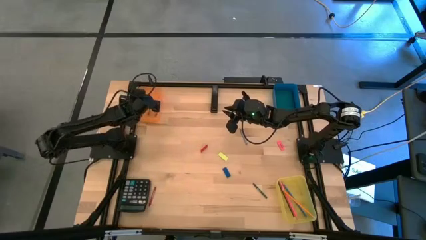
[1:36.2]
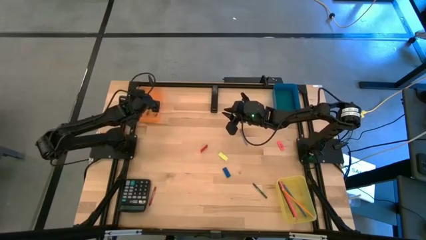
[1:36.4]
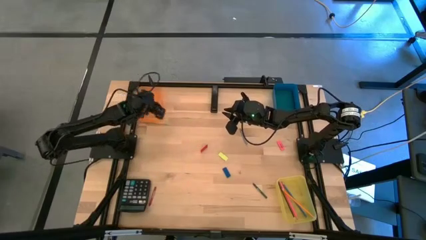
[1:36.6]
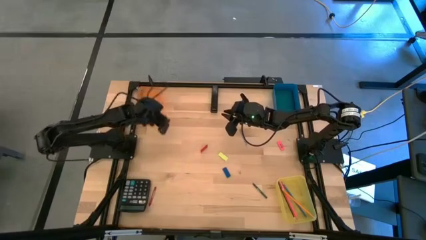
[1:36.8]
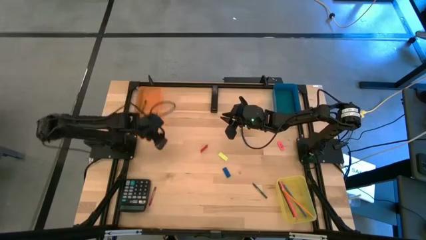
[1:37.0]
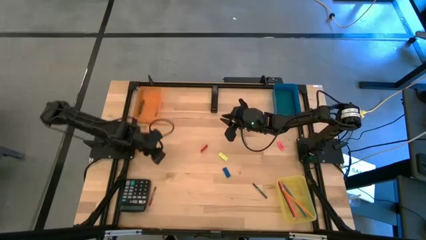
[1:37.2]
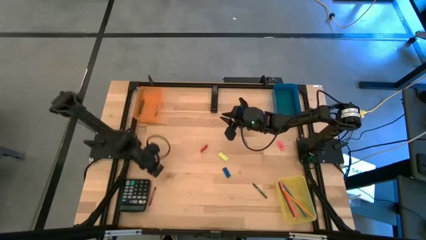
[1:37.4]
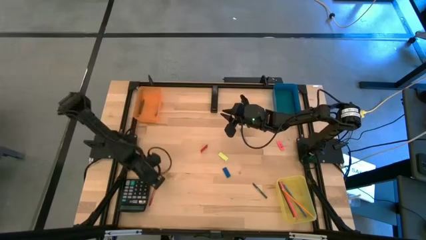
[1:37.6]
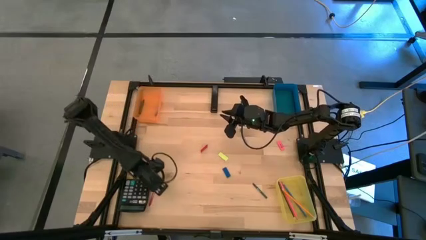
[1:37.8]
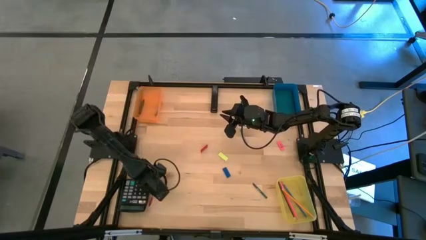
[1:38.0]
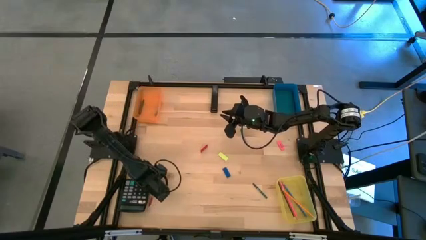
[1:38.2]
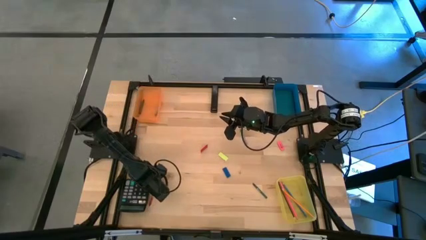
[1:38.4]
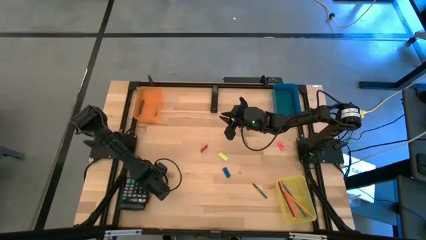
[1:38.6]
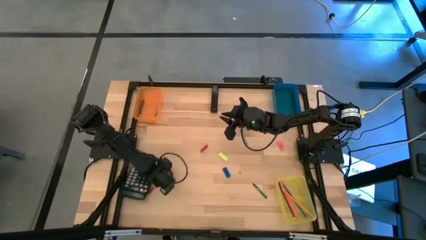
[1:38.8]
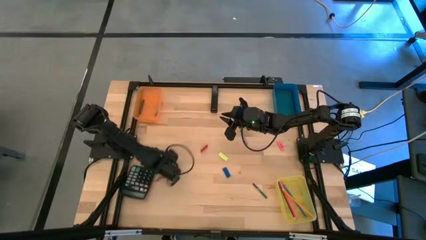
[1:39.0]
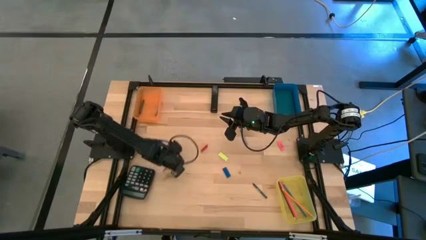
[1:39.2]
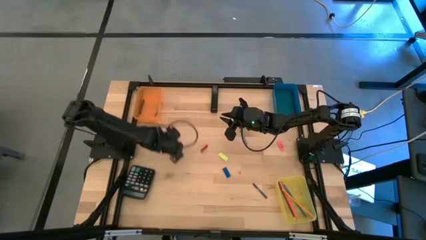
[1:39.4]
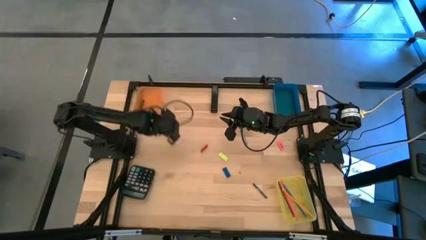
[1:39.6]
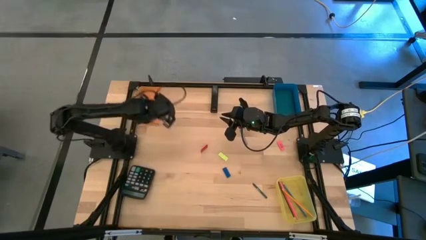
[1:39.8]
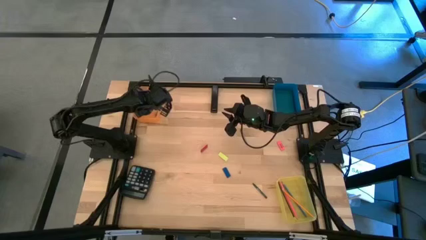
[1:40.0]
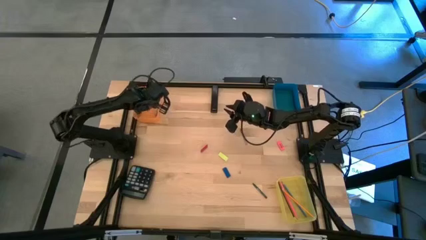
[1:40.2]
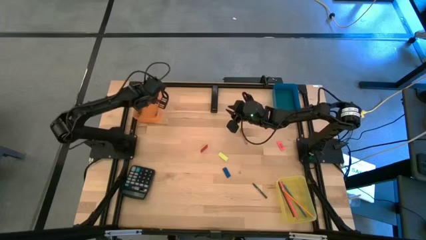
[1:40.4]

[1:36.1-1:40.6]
Task: Sort crayons/erasers/pens/pencils in bins
Put the red crayon into the orange bin

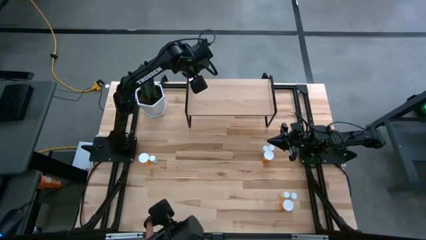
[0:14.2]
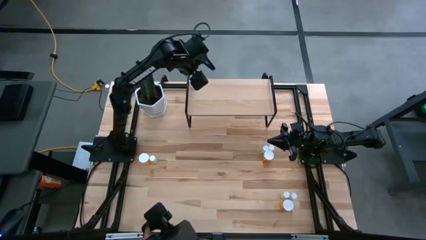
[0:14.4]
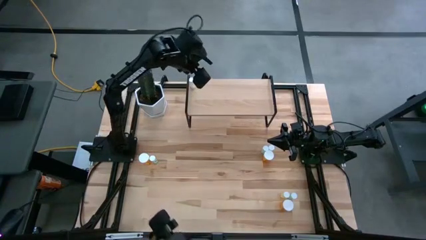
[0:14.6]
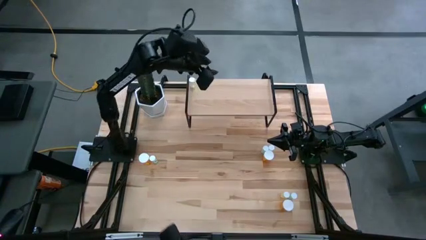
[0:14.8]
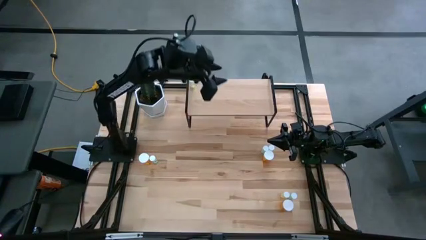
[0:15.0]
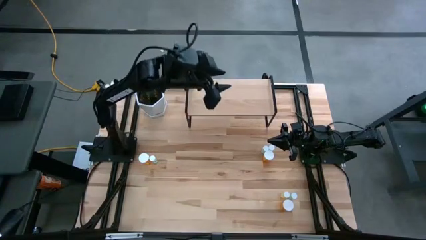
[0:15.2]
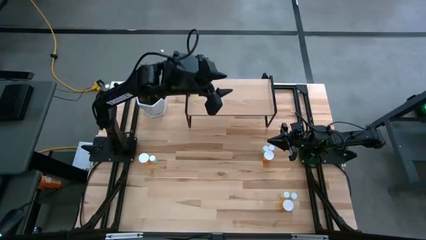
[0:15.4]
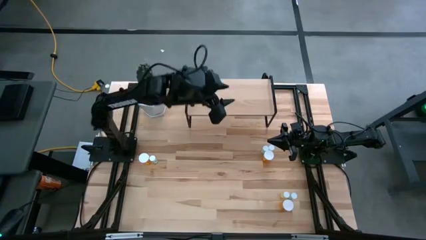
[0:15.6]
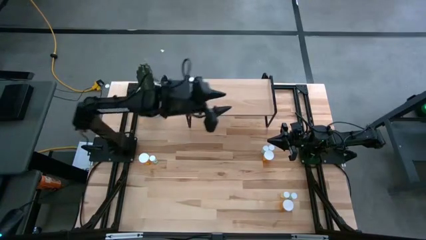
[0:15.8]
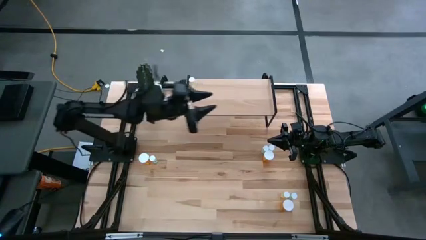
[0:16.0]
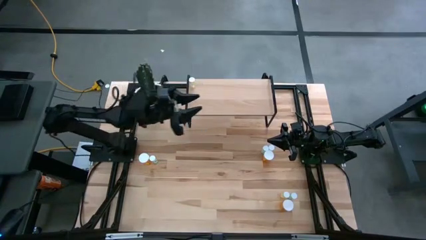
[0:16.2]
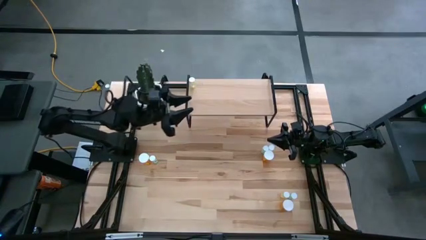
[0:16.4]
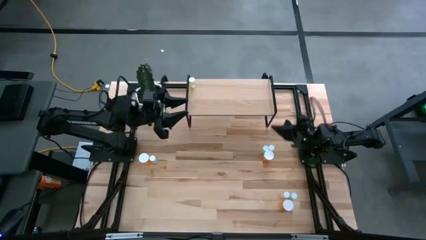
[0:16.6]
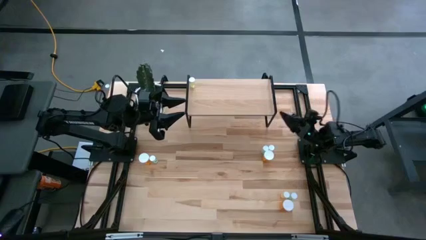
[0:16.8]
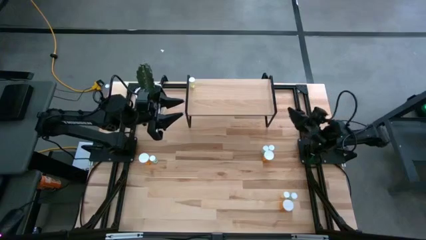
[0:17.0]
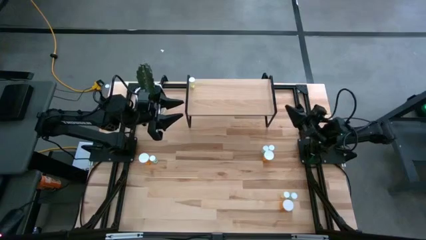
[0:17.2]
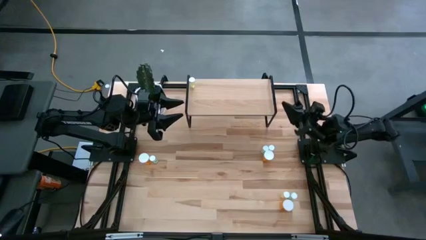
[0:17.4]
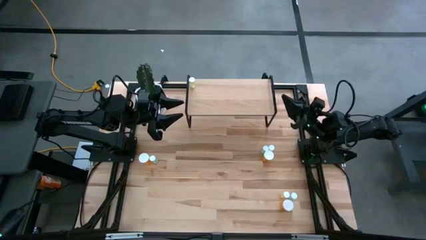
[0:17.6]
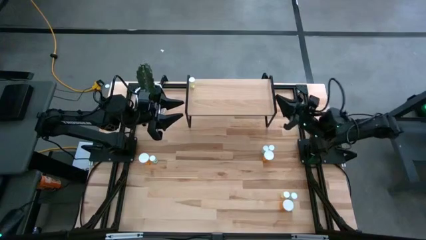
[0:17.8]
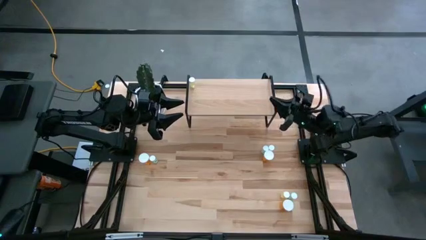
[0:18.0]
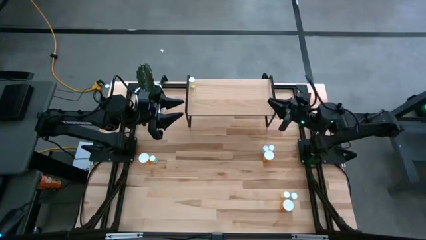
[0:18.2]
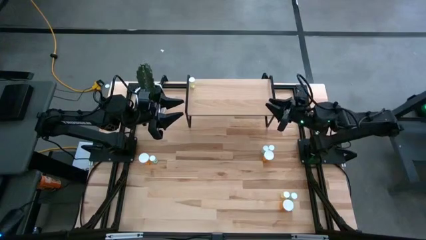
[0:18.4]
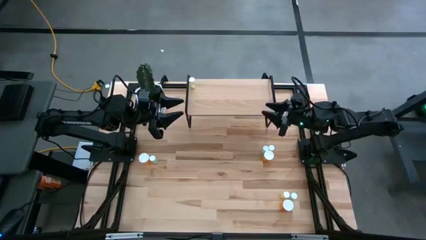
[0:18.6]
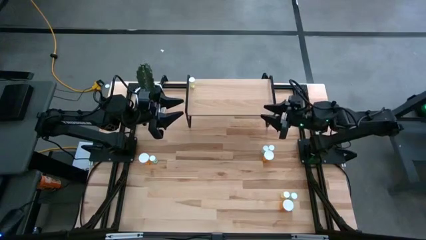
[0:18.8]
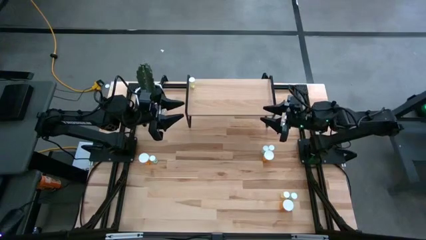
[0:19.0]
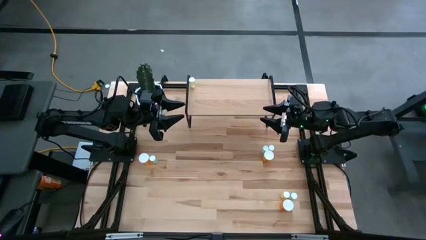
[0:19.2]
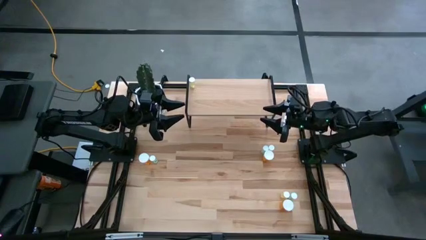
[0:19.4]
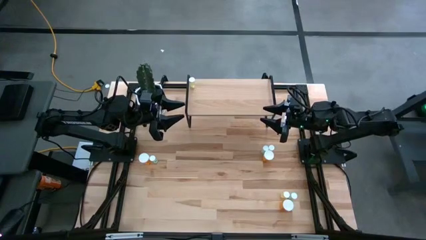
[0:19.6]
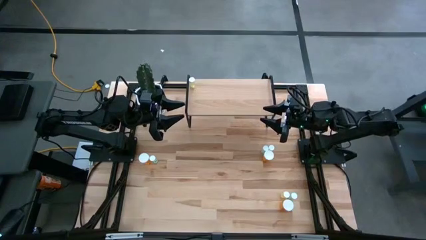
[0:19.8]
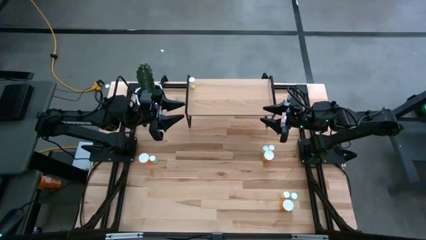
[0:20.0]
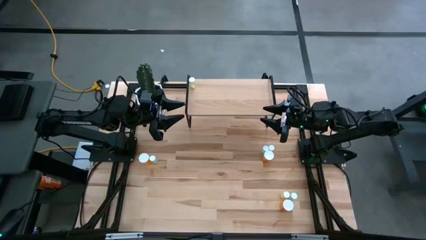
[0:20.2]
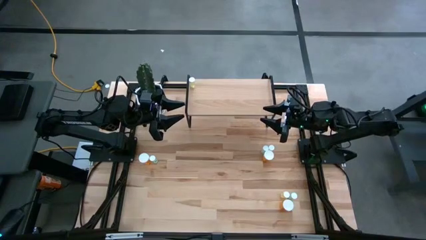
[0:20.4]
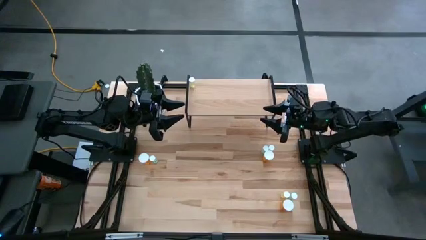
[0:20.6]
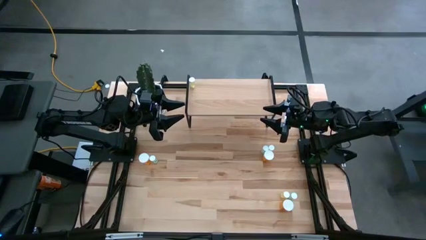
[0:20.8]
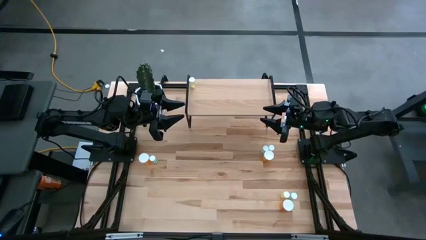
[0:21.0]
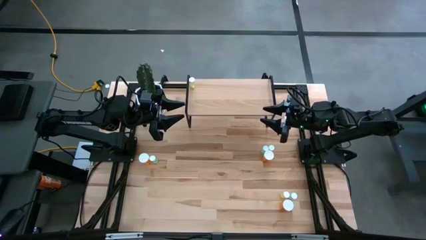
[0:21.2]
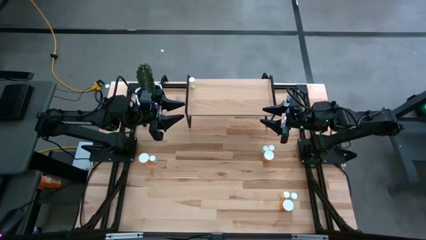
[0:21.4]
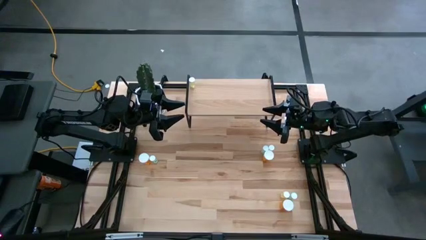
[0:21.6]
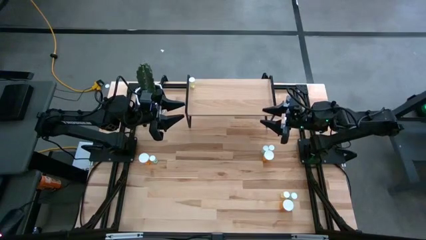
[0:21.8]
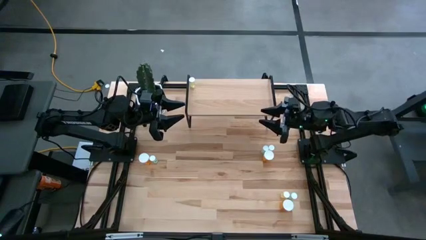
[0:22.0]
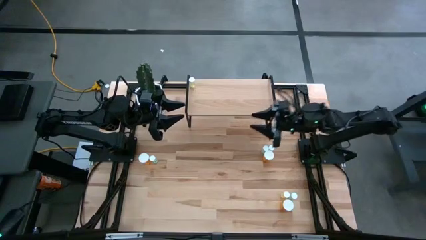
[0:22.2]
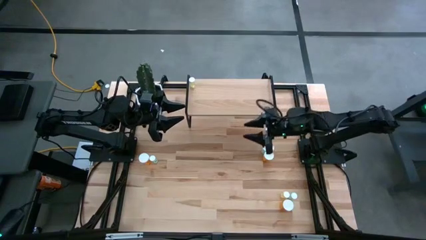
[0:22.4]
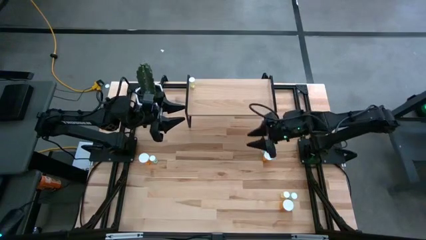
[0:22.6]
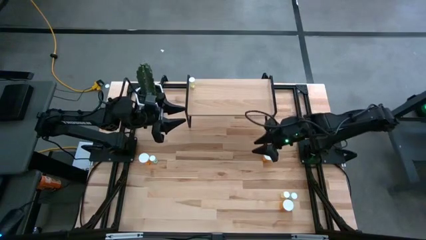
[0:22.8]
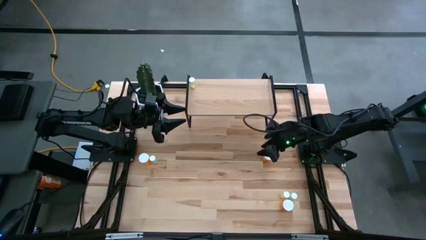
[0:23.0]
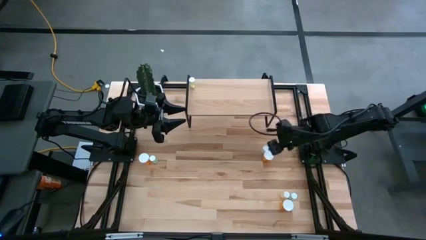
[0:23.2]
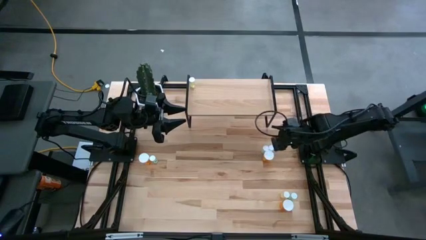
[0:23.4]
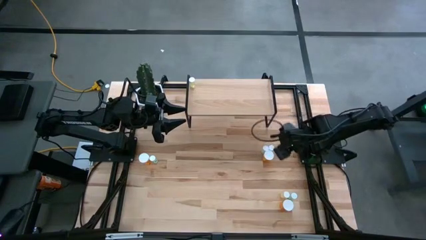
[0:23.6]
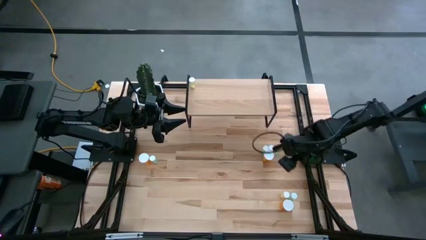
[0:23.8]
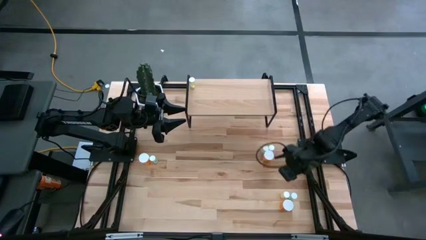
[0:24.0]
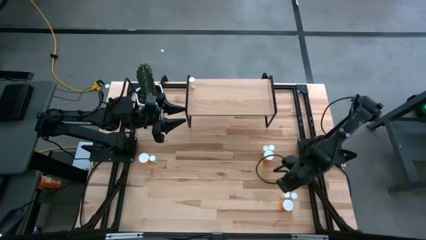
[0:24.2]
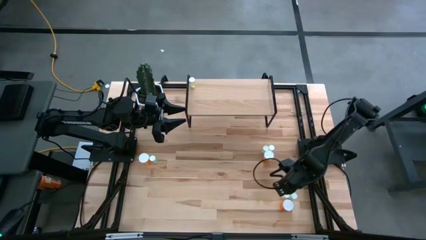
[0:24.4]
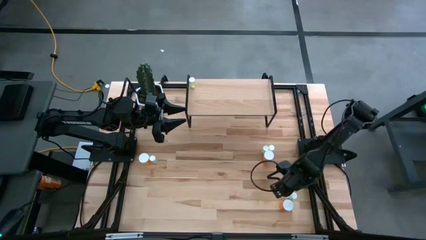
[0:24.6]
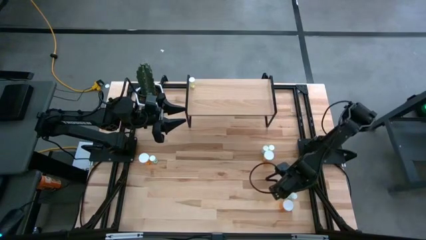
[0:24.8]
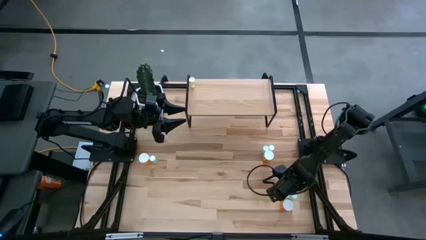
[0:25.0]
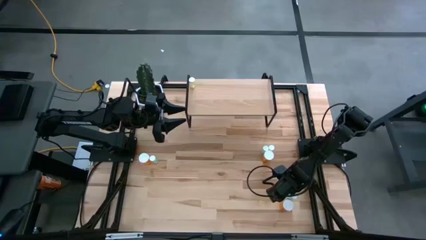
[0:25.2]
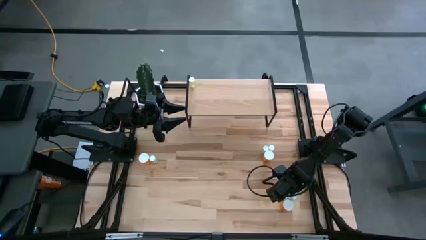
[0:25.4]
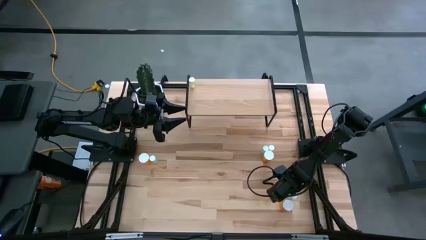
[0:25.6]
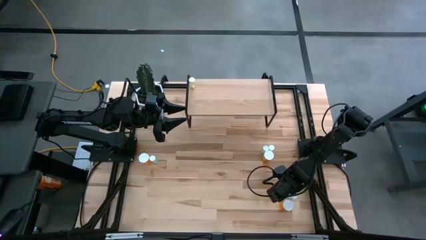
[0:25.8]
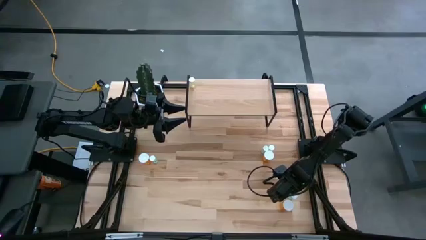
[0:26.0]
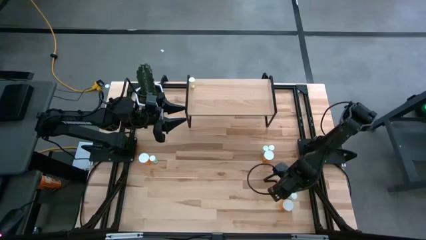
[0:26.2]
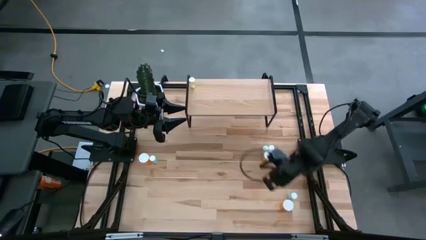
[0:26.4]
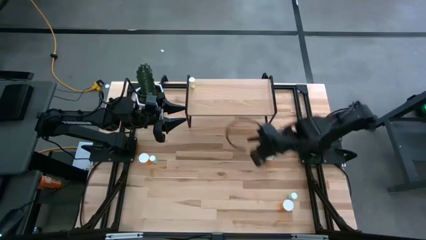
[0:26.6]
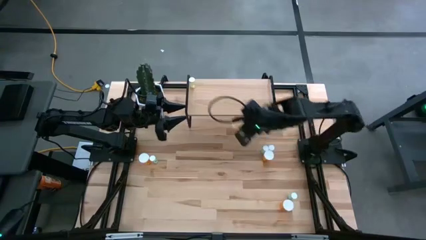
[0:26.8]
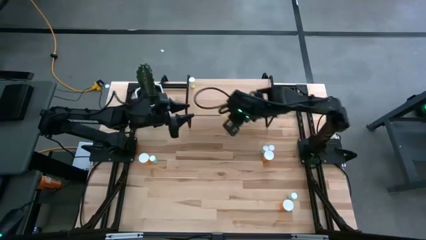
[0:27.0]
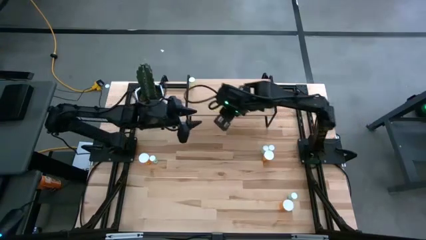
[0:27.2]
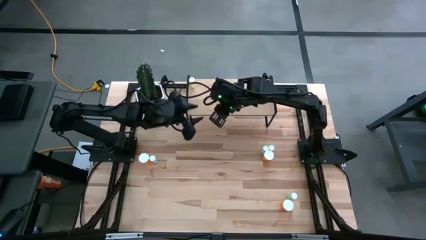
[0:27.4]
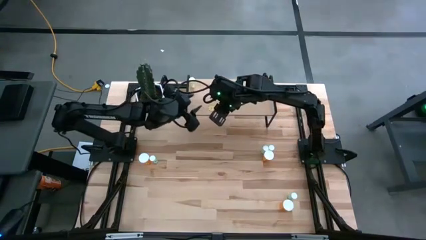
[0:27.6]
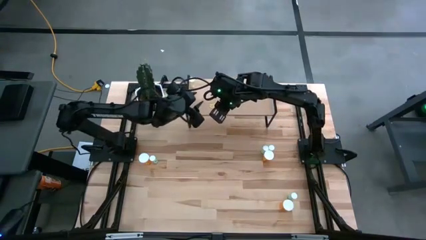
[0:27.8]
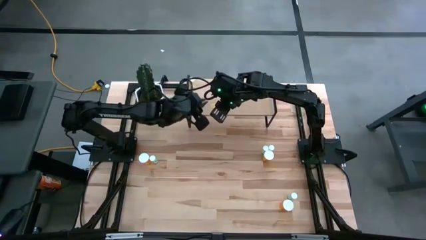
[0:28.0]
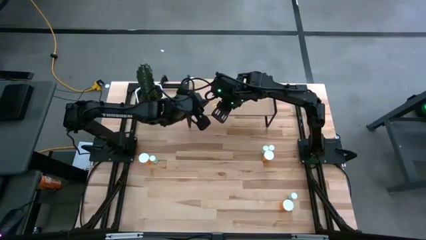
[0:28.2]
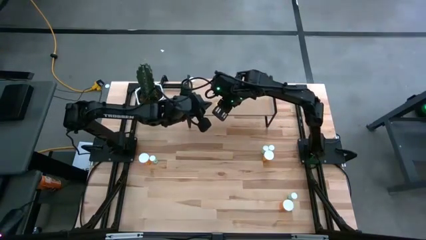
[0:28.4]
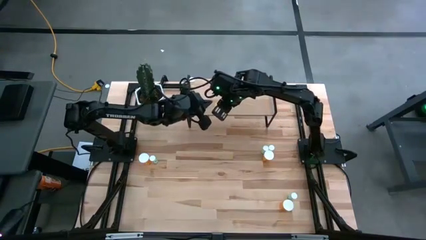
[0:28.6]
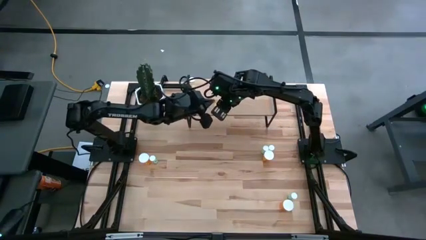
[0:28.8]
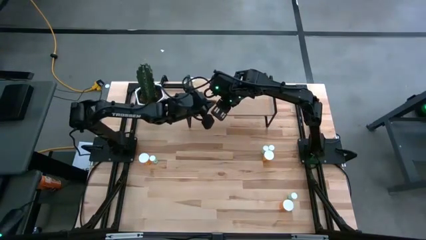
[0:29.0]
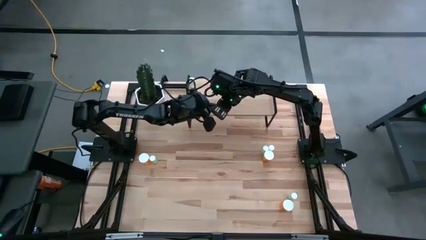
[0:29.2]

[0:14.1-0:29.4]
Task: Pick and place medicine bottles onto shelf by color
Align the bottom yellow pill bottle with the other yellow pill bottle on the shelf
